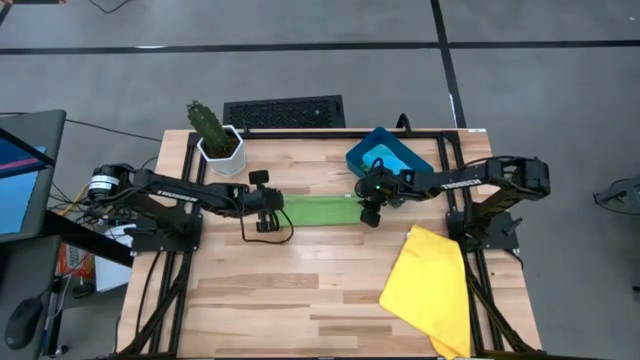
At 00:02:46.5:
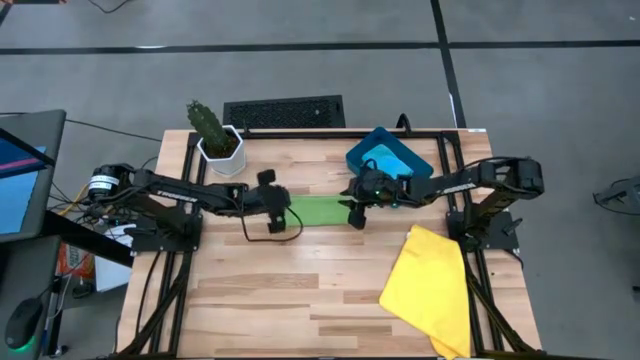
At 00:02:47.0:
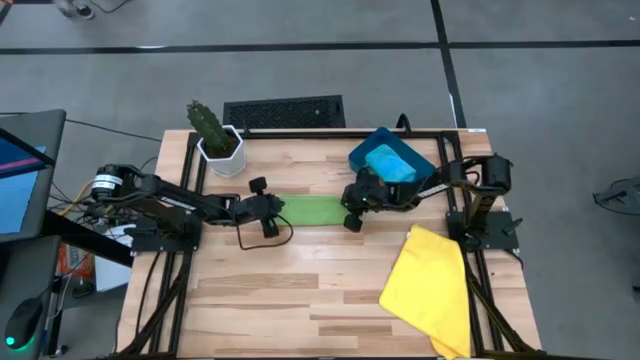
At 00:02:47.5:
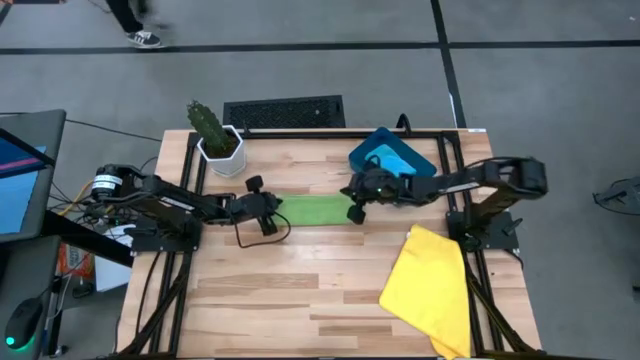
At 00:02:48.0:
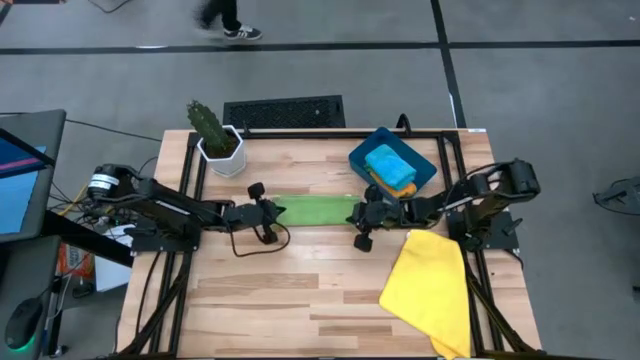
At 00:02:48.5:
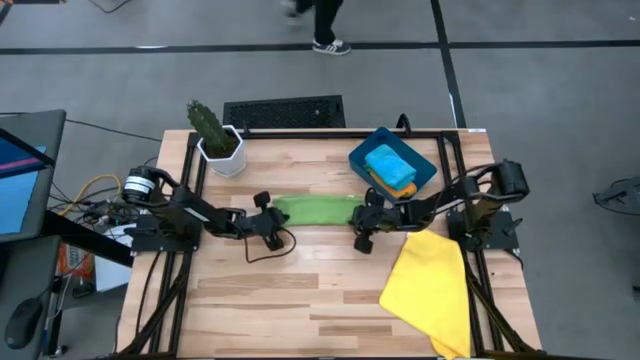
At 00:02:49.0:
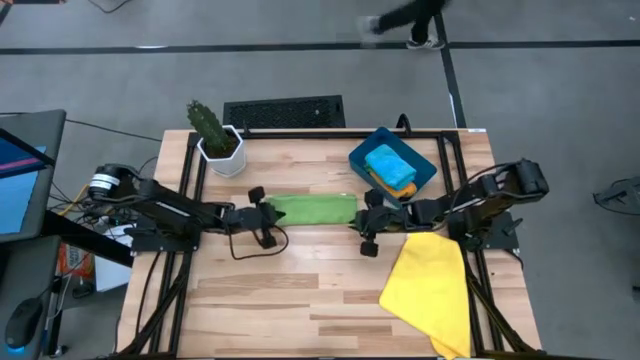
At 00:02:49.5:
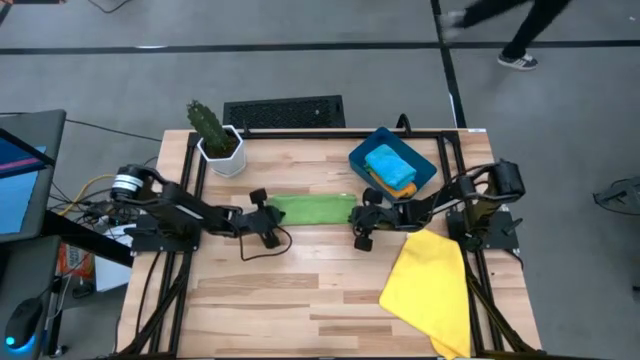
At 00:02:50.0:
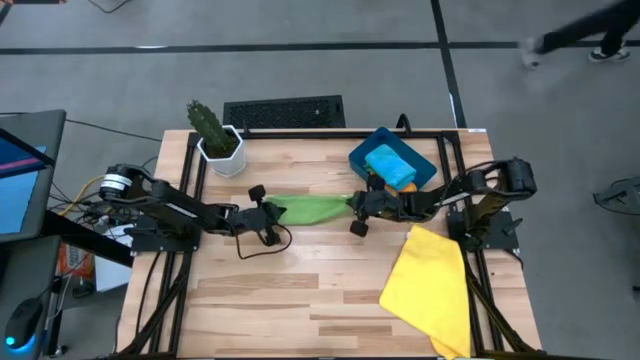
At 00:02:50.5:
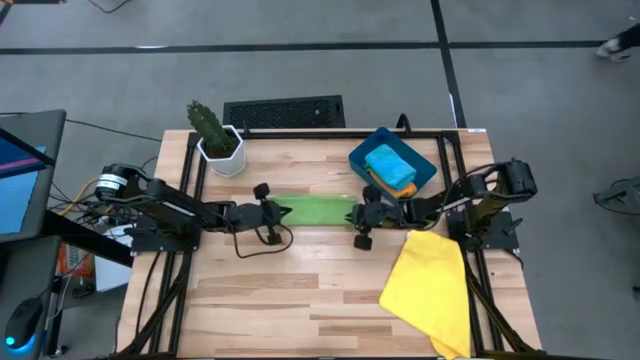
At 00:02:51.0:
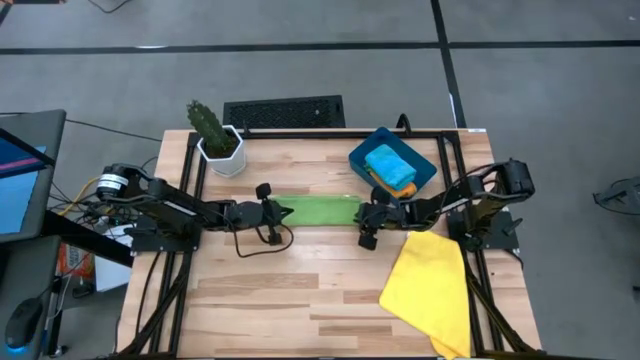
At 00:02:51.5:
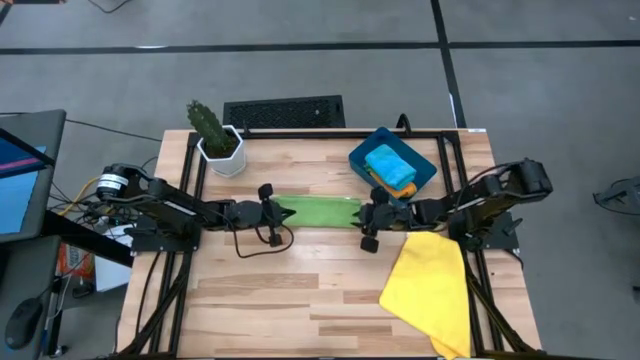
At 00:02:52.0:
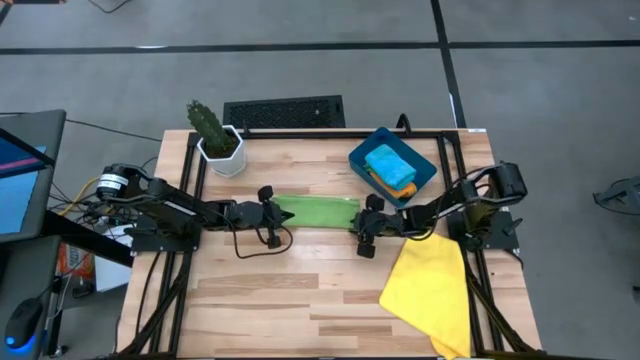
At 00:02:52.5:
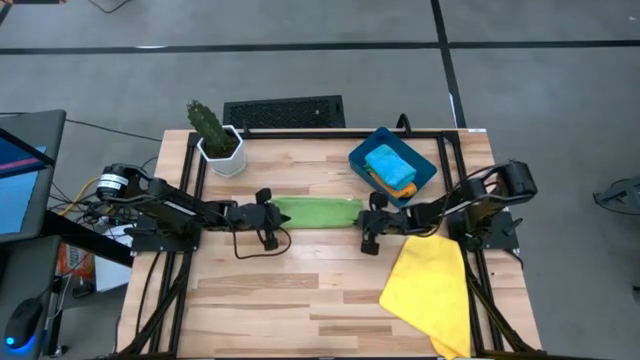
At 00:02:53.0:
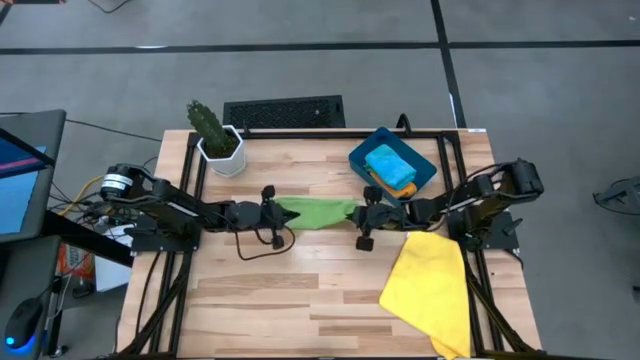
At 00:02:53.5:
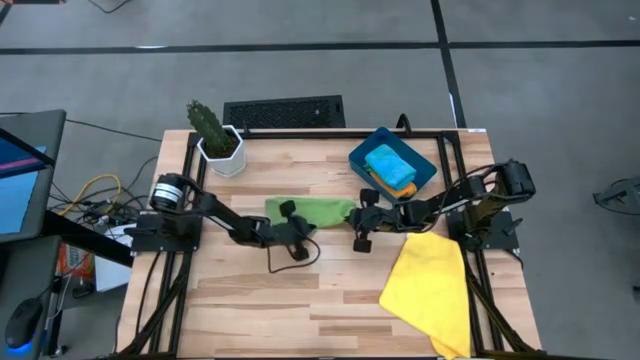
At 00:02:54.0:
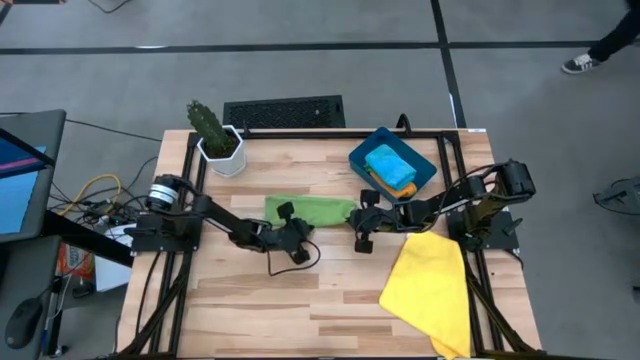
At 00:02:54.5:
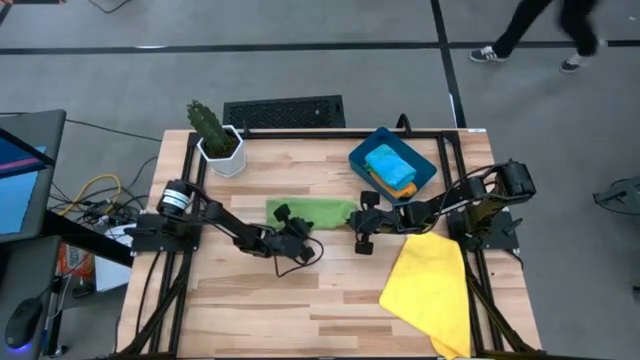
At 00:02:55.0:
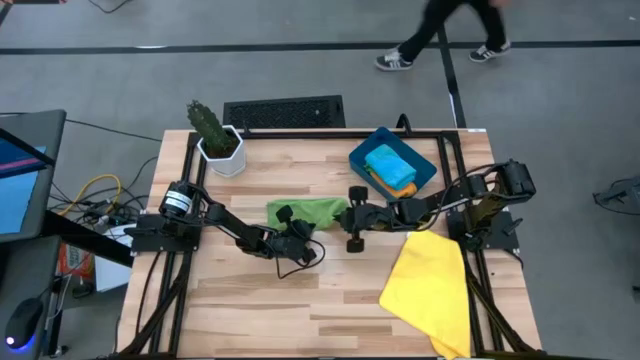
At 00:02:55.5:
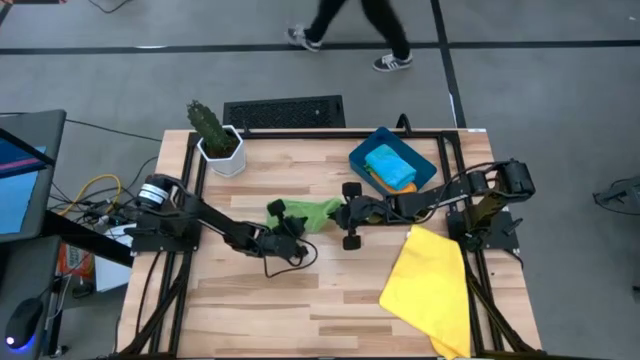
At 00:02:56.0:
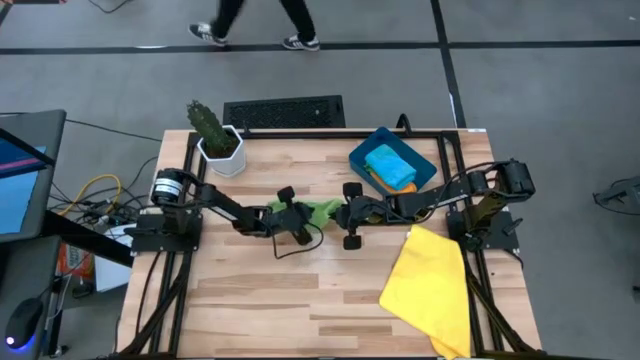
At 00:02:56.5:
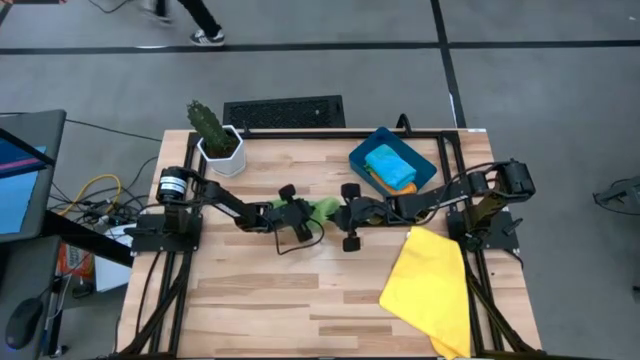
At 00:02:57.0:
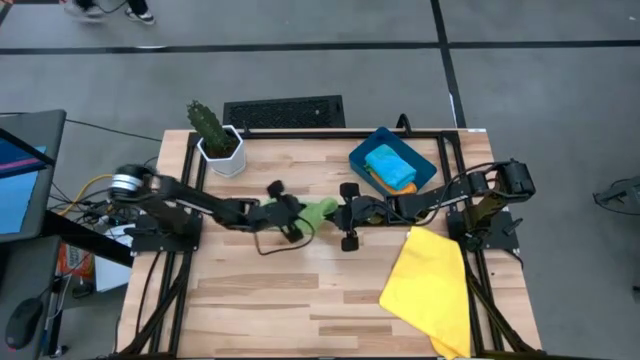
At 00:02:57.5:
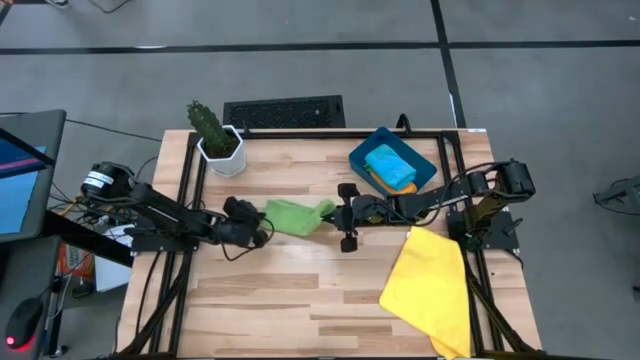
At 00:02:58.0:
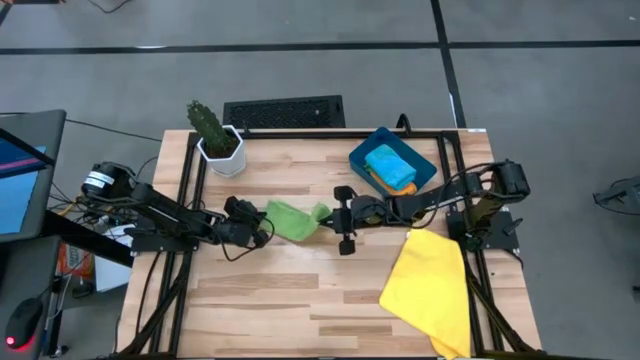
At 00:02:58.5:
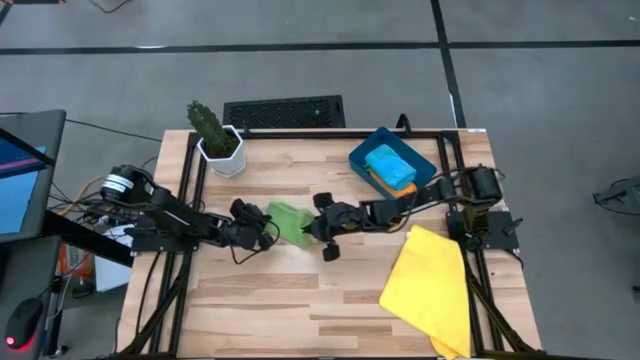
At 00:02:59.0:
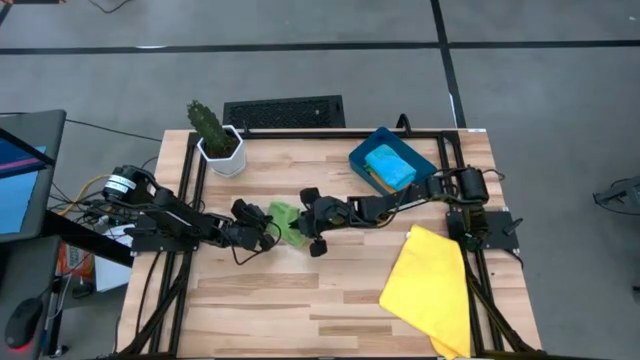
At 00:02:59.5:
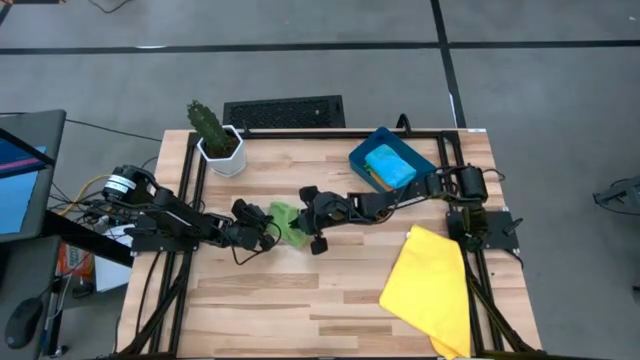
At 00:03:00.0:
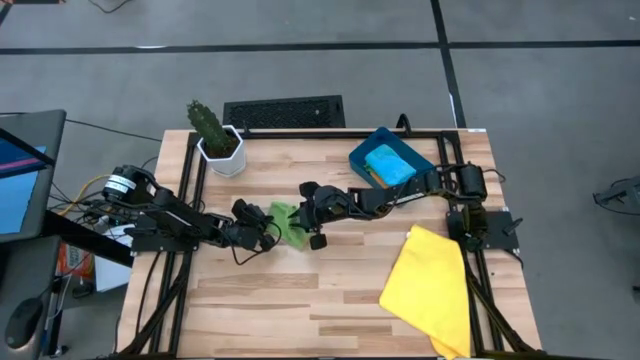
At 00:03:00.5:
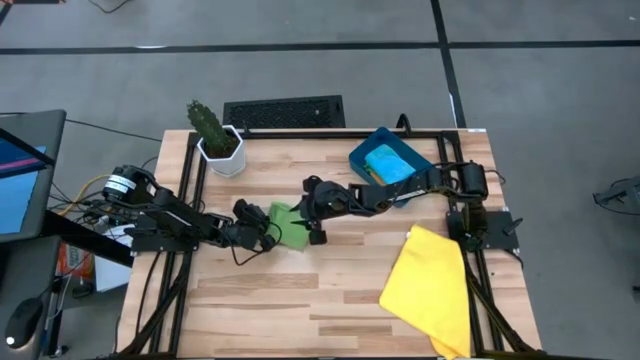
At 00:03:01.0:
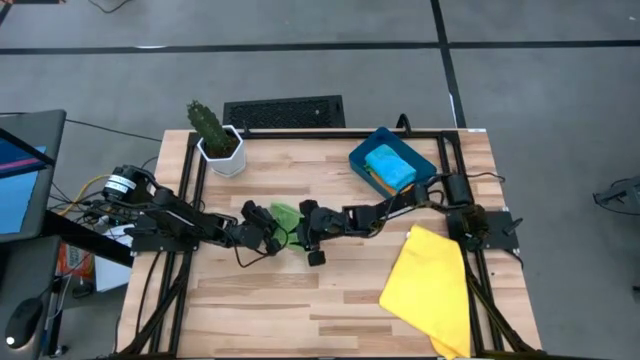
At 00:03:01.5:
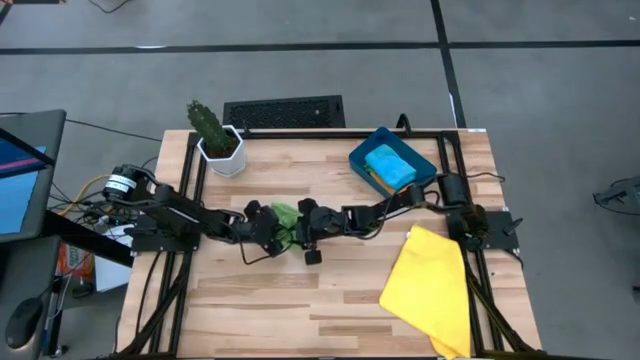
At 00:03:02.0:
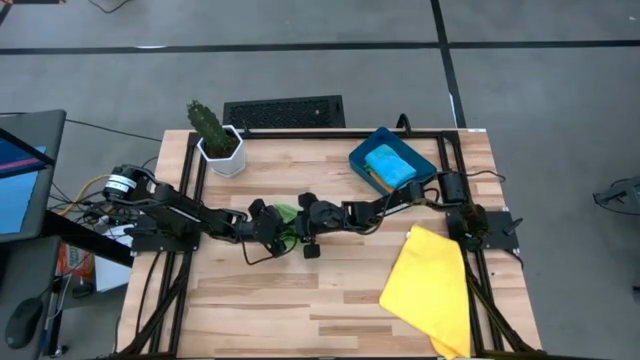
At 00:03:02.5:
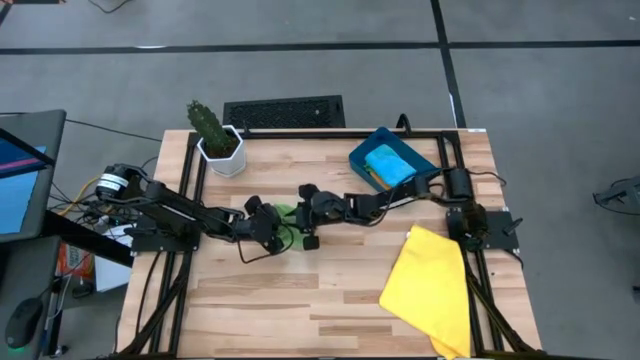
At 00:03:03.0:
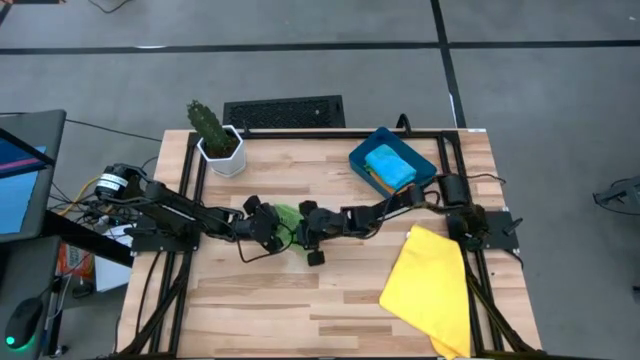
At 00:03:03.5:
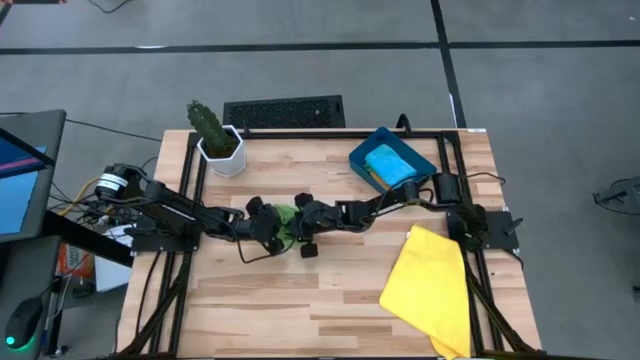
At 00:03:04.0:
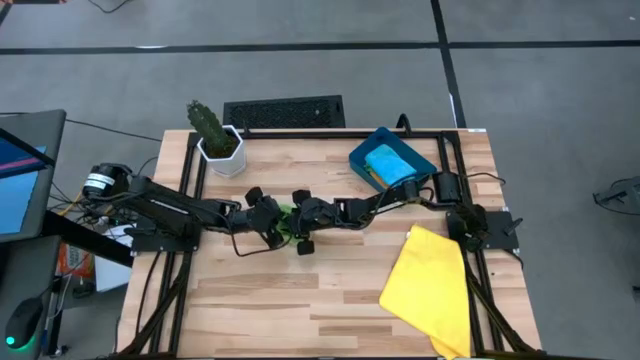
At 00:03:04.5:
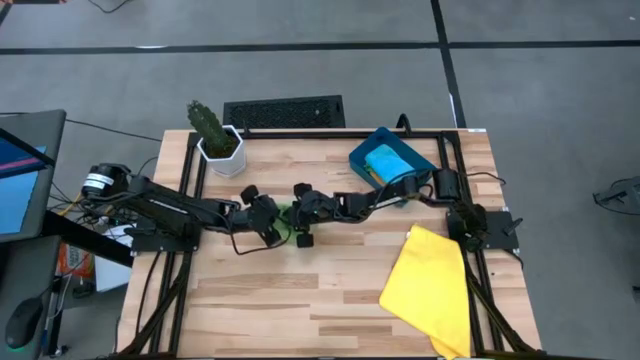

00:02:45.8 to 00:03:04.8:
Task: Fold microfiber towels
Fold the green microfiber towel
